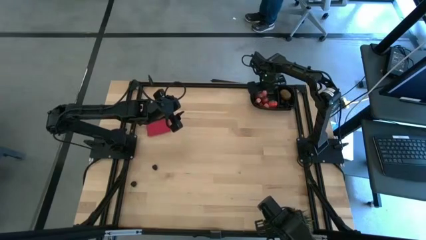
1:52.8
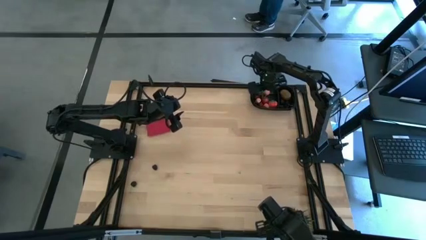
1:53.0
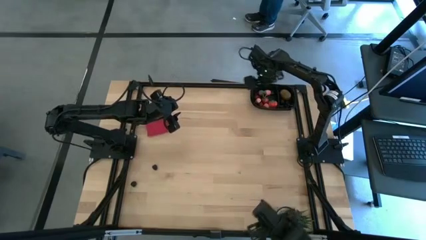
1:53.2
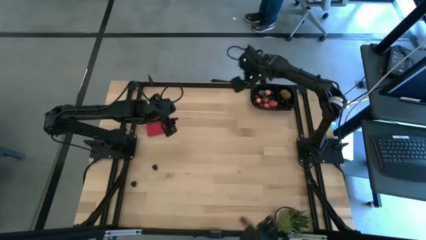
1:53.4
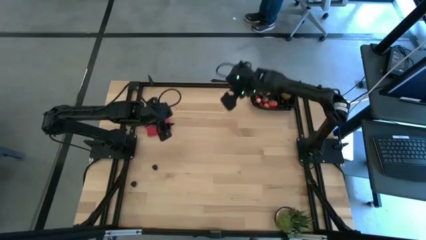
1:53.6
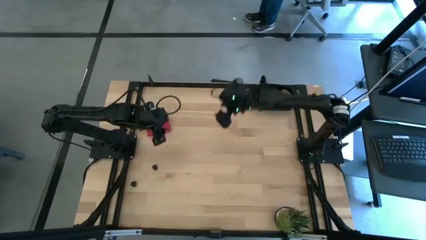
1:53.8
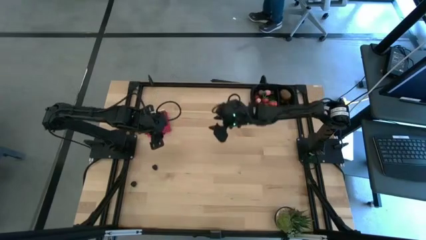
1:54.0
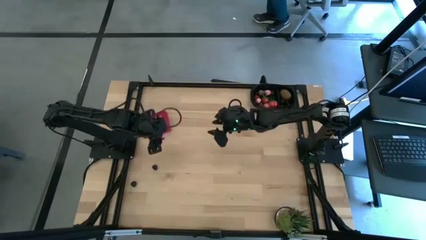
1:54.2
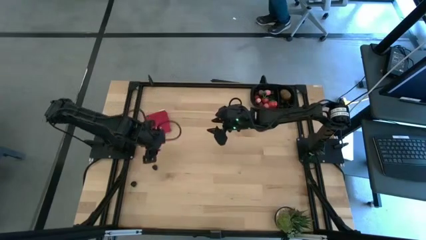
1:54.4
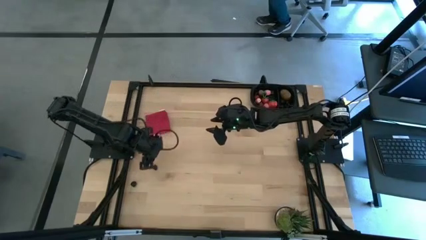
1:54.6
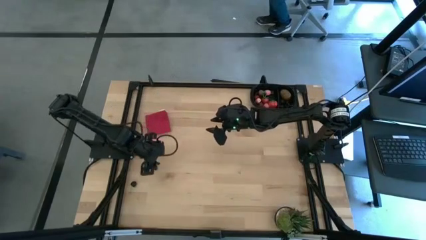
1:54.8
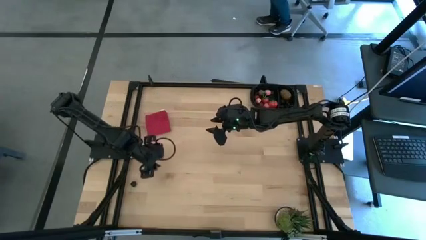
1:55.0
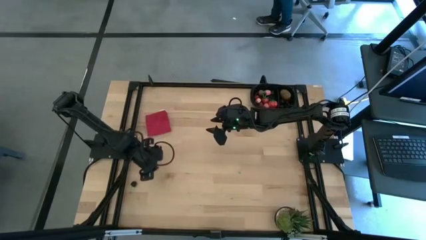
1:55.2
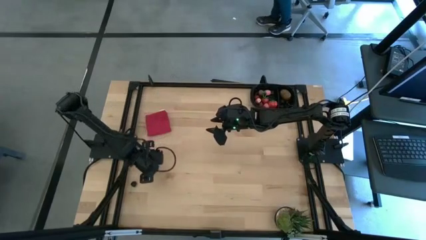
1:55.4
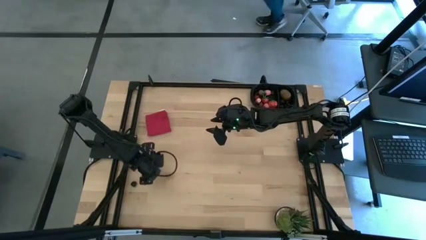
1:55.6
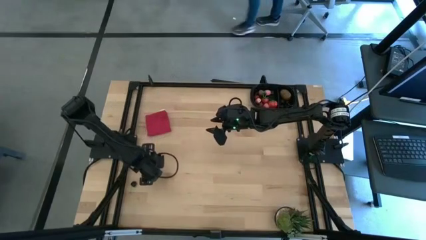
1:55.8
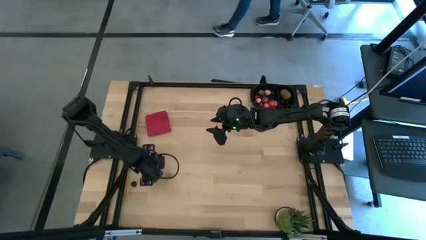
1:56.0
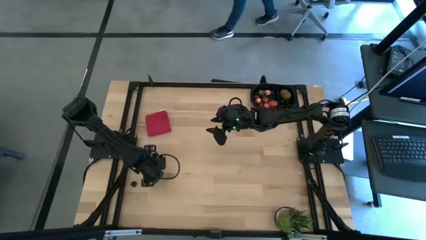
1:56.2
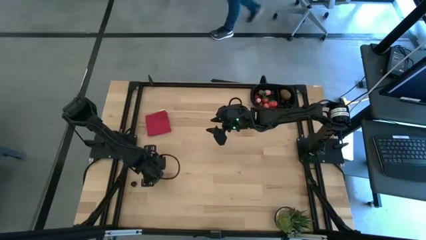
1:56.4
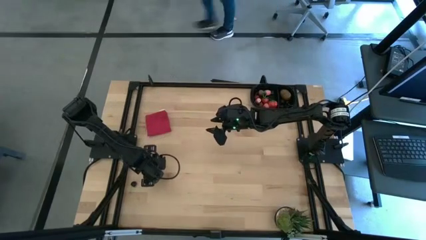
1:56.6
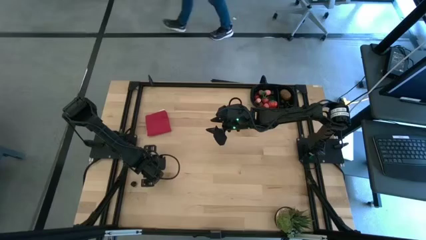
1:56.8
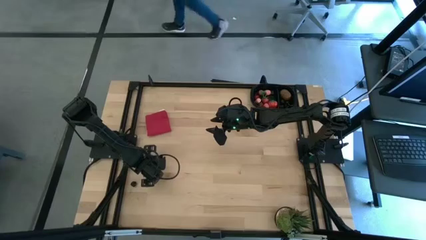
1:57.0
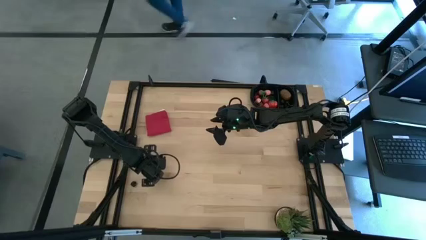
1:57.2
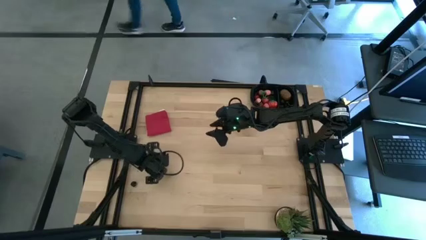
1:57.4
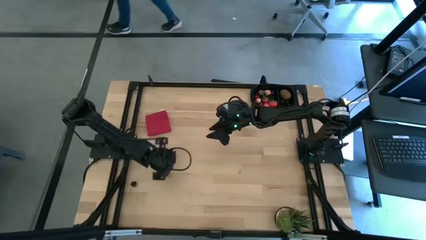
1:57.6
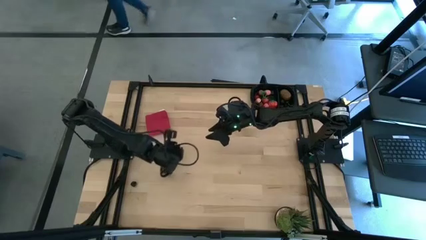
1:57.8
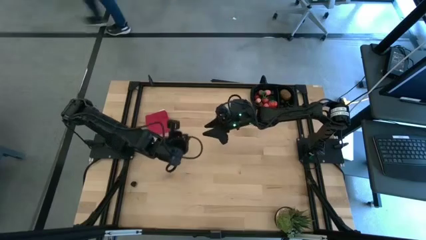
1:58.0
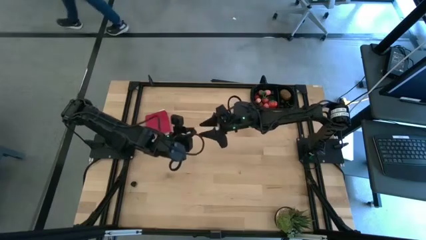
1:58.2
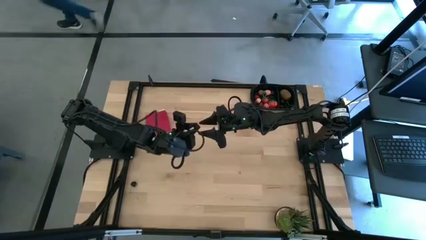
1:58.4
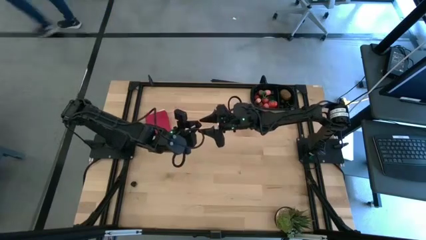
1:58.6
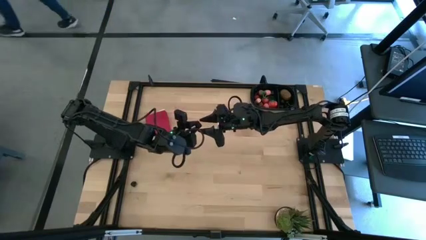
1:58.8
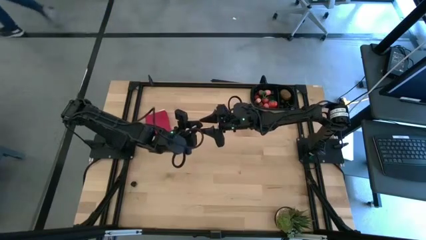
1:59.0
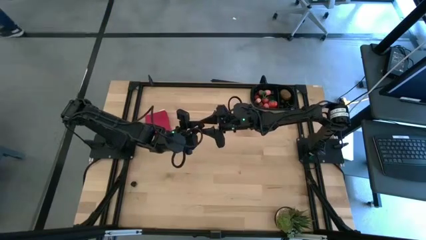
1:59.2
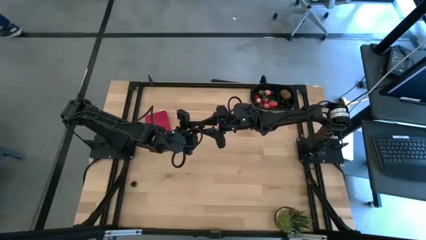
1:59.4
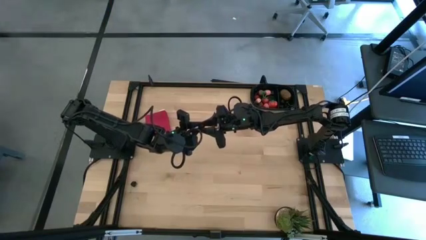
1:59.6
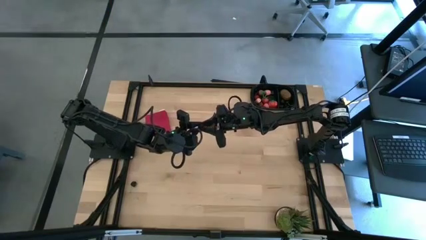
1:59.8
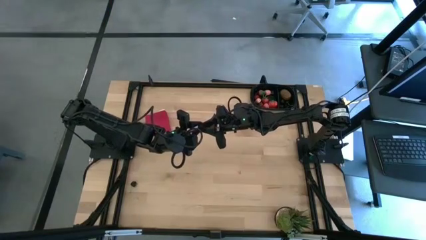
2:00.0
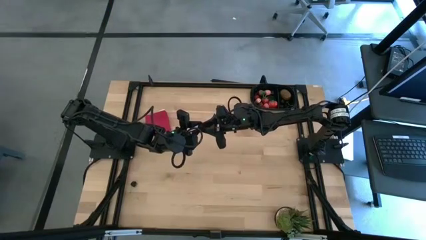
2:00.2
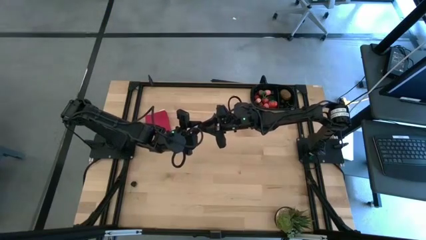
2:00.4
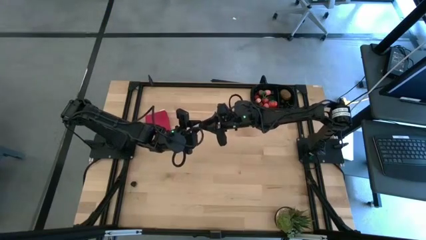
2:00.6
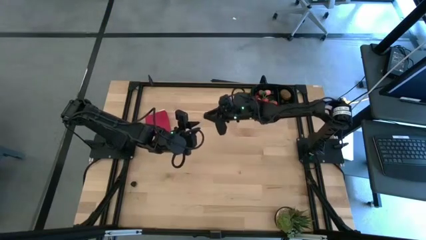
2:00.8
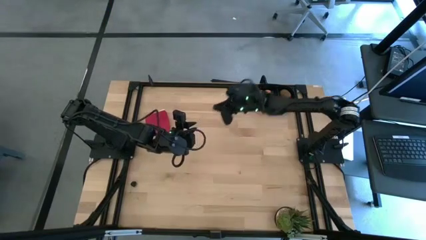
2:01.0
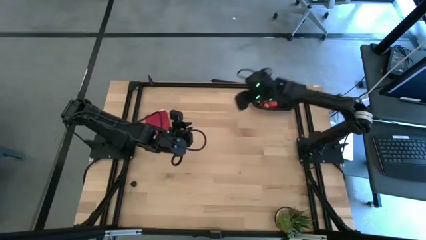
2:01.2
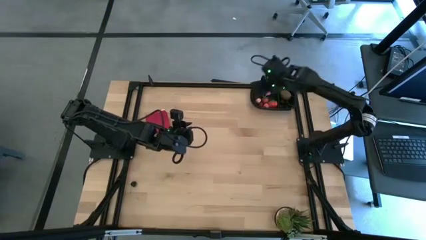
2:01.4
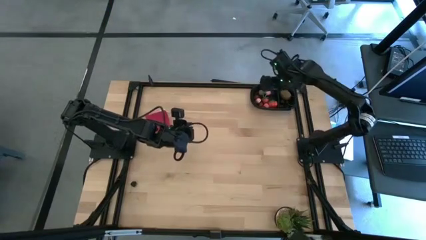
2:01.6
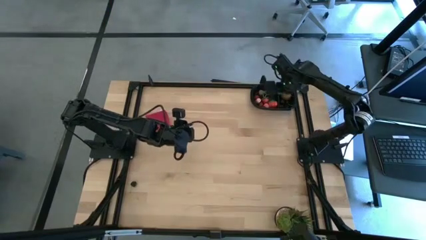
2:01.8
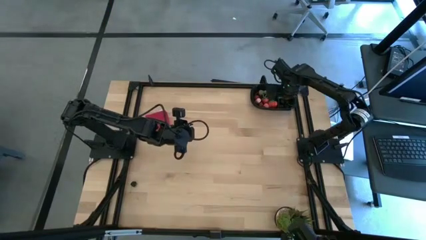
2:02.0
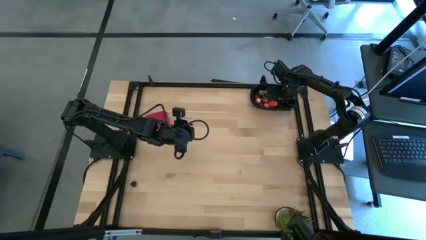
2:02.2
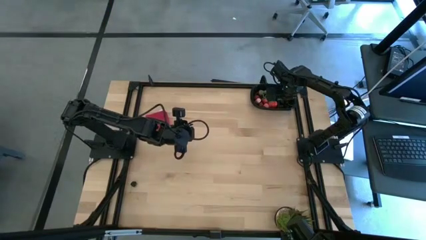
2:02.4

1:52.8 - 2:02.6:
Task: Pick and placing Produce into tupperware
Put the black raspberry into the black bin

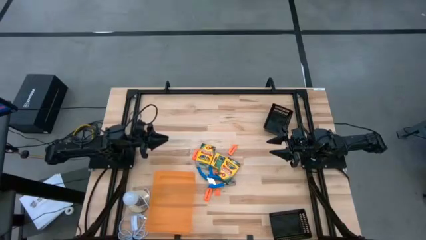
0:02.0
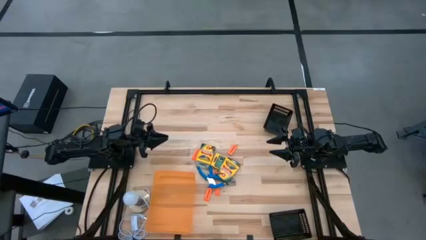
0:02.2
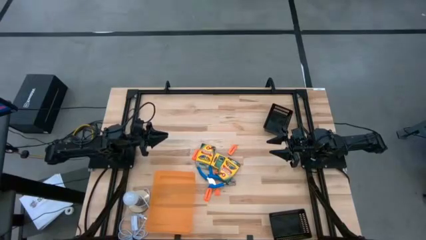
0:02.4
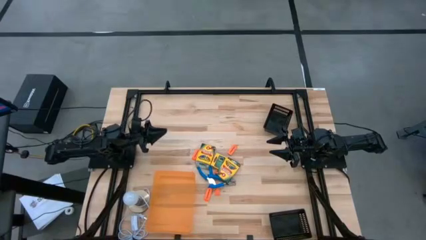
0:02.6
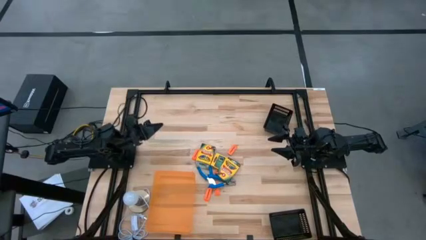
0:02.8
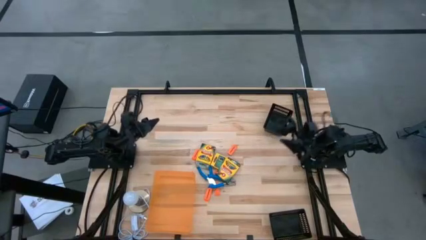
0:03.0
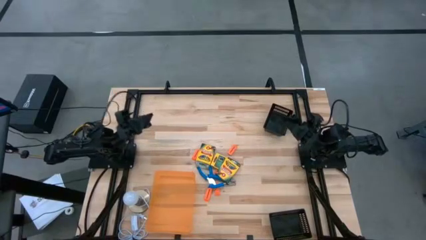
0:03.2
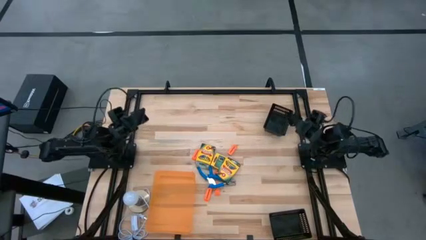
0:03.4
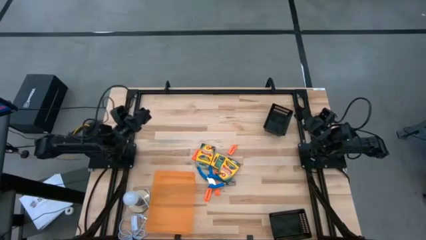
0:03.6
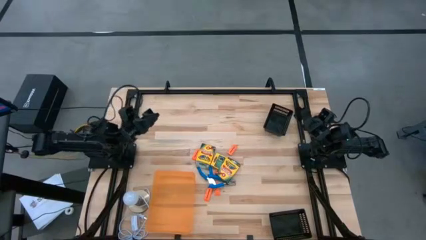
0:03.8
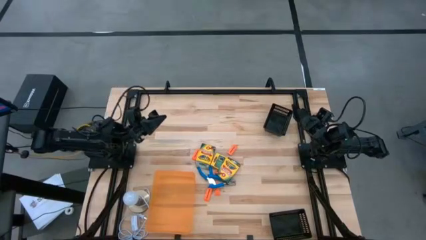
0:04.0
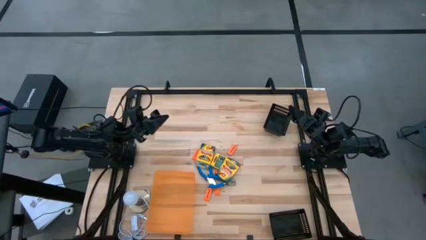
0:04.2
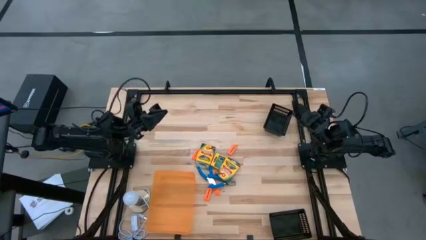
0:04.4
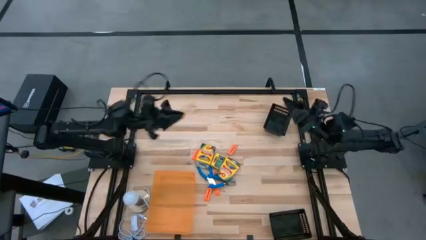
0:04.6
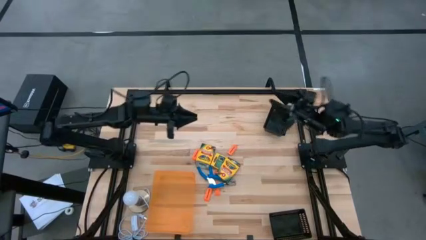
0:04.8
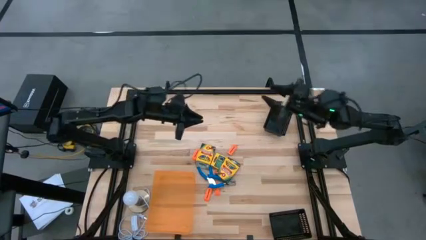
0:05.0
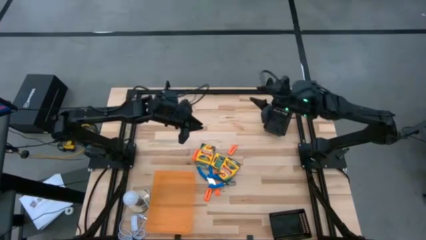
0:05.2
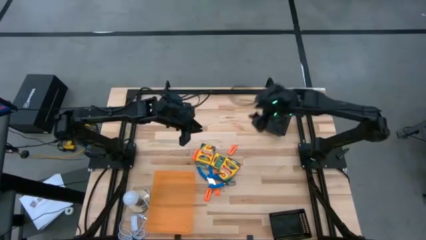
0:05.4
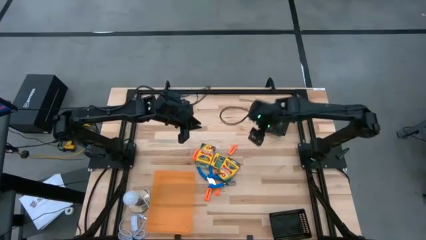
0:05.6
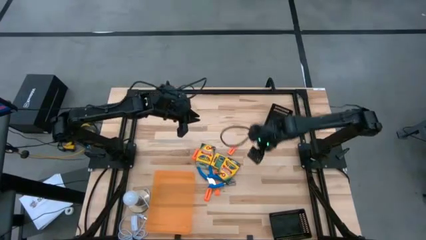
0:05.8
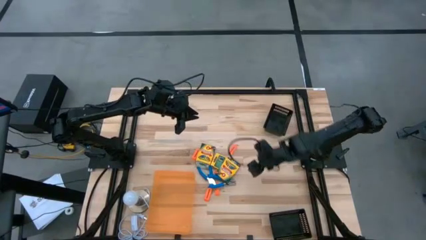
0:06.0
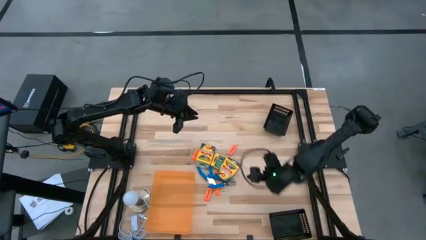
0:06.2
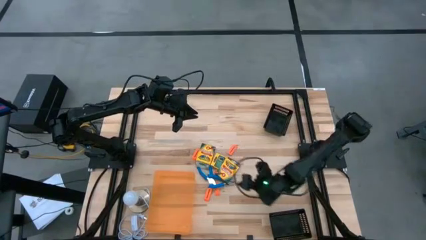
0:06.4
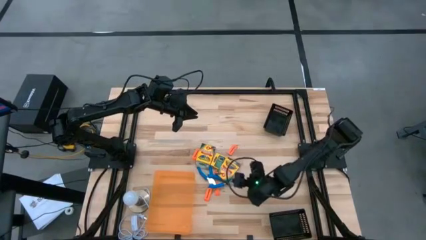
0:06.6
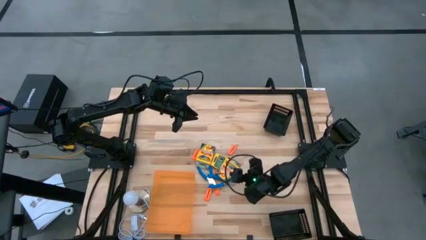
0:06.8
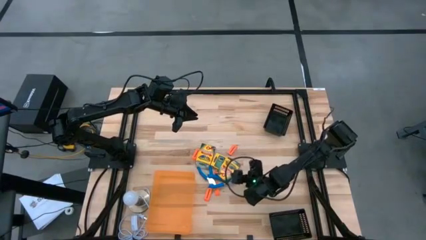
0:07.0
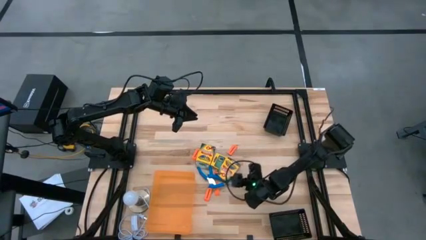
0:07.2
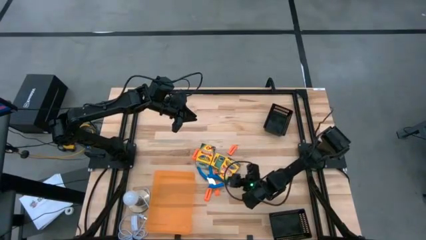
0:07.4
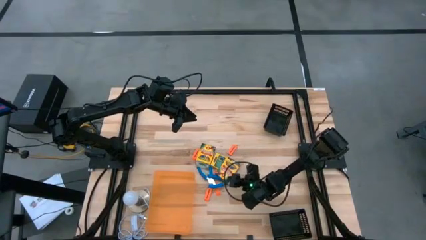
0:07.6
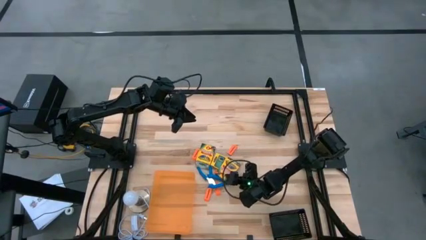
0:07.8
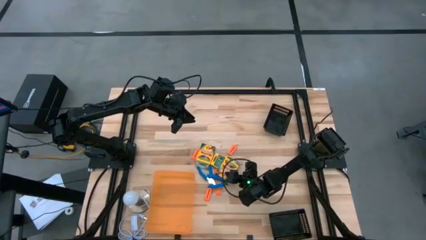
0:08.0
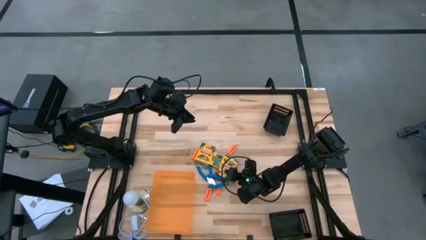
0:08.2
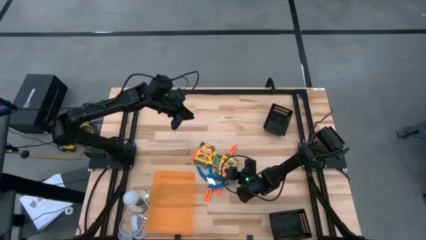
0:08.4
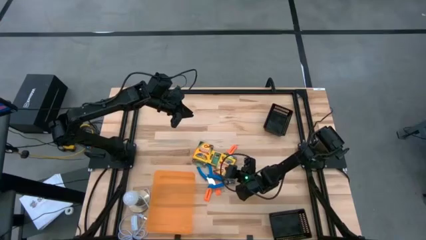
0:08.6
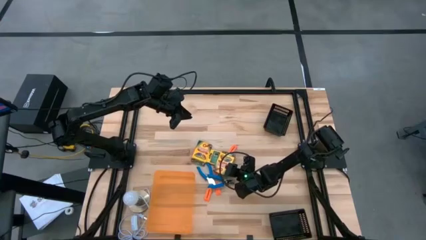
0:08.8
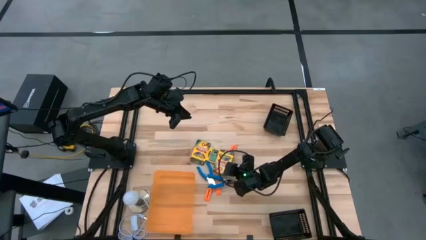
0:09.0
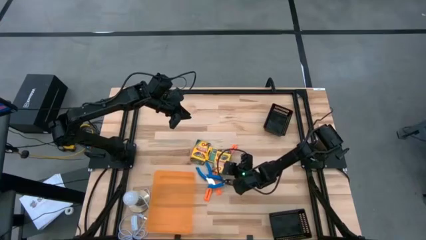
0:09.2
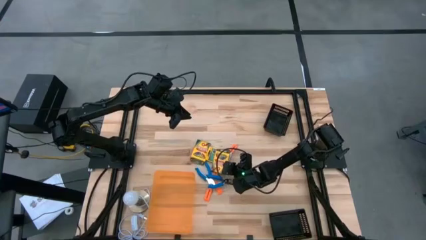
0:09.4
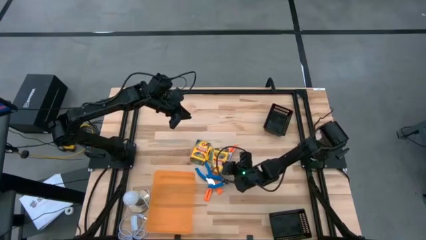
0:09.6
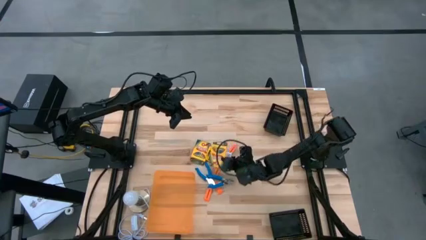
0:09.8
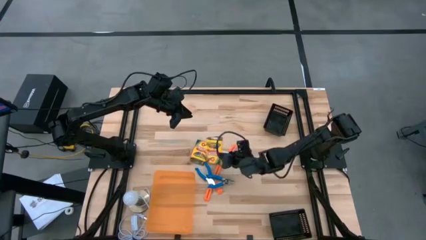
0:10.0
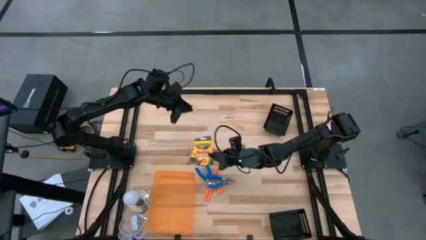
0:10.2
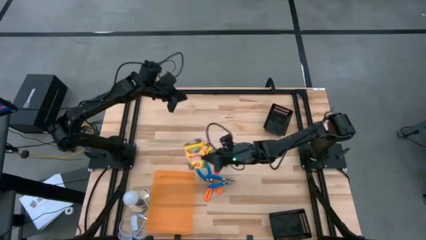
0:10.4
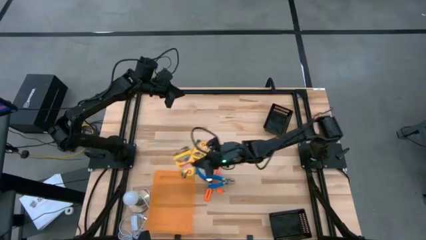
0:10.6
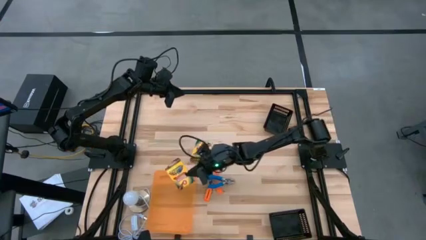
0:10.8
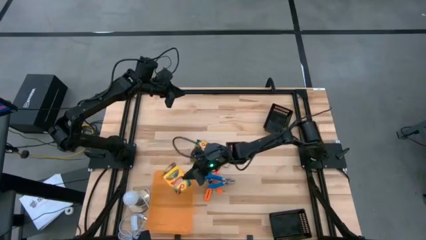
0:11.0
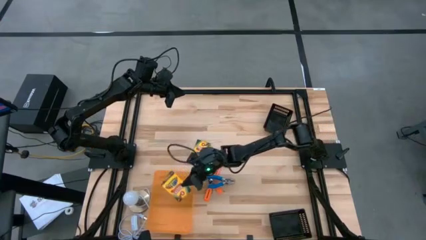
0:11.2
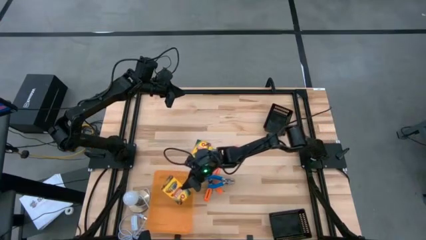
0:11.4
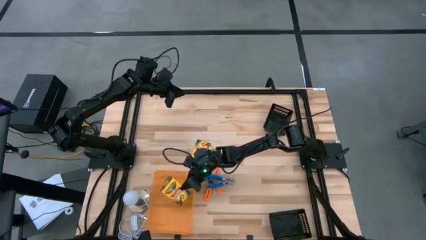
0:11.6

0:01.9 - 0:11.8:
Task: Pick & Place School Supplies
Put the bottom yellow crayon box into the orange bin
